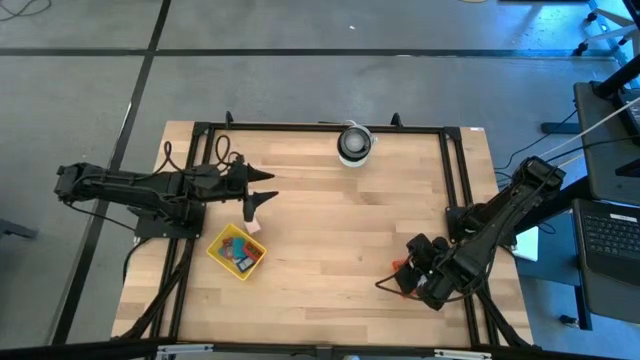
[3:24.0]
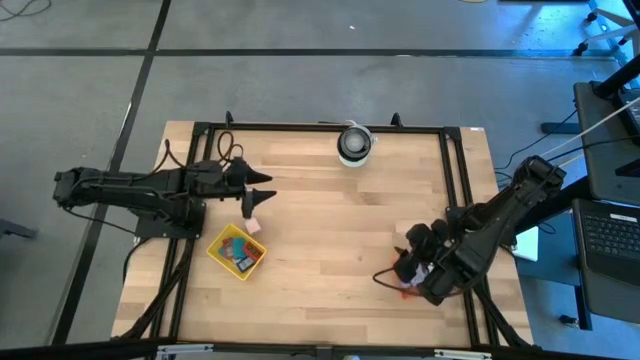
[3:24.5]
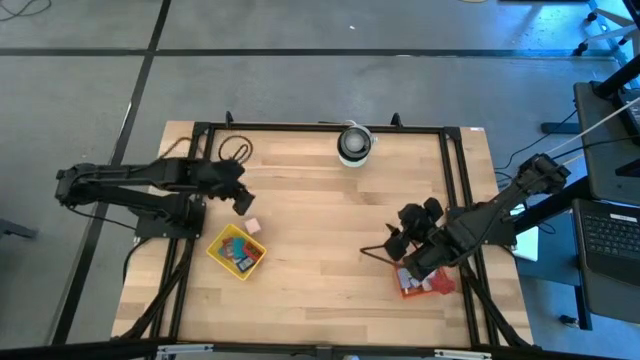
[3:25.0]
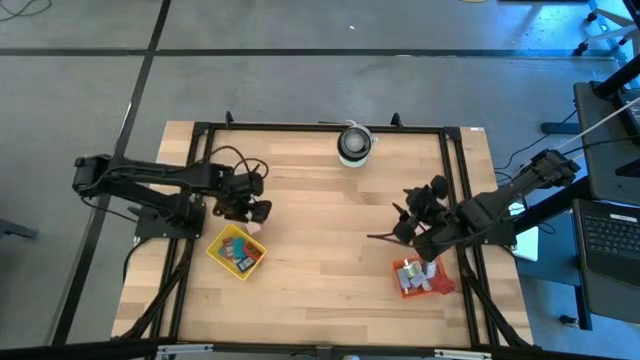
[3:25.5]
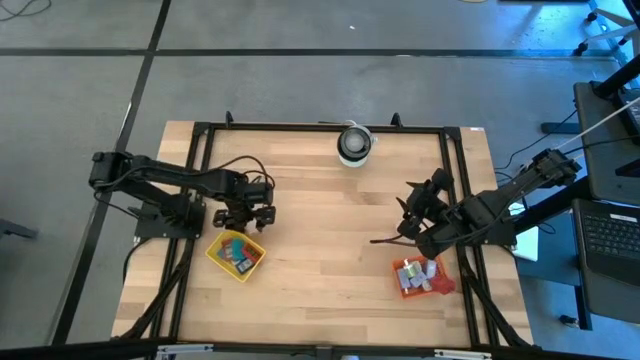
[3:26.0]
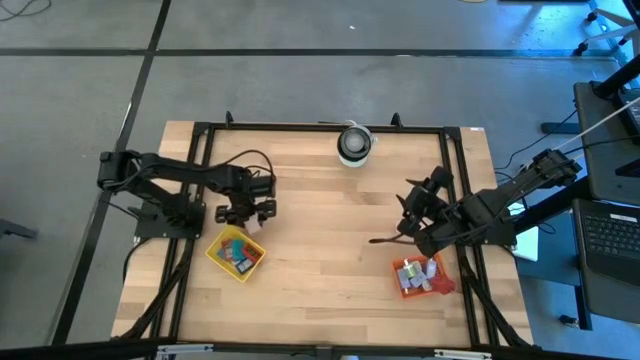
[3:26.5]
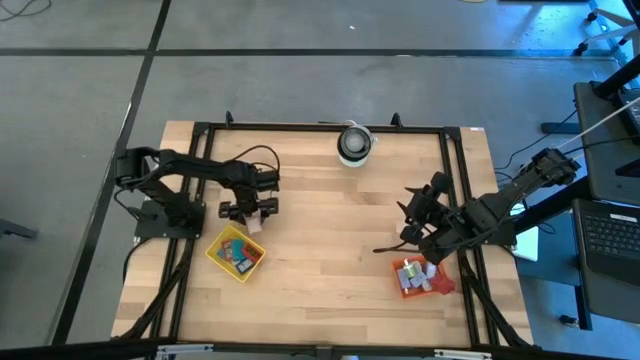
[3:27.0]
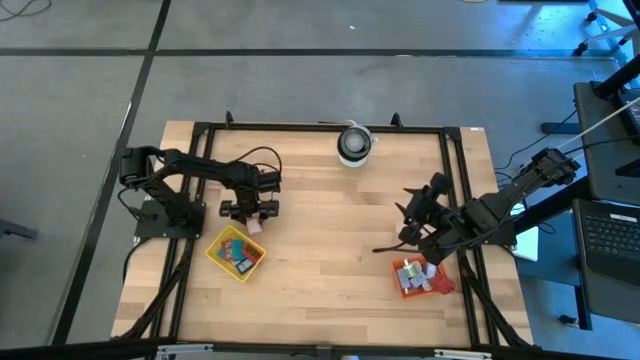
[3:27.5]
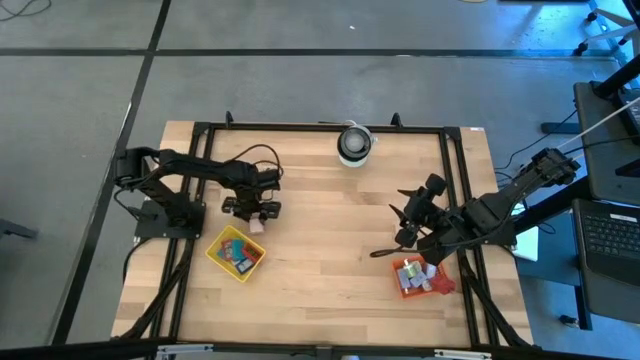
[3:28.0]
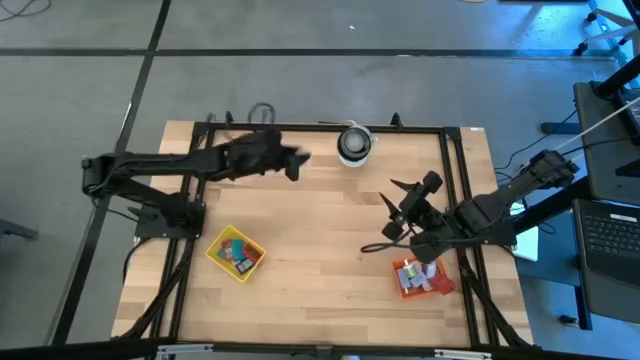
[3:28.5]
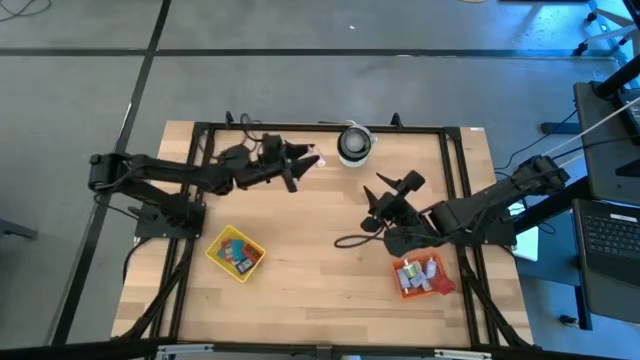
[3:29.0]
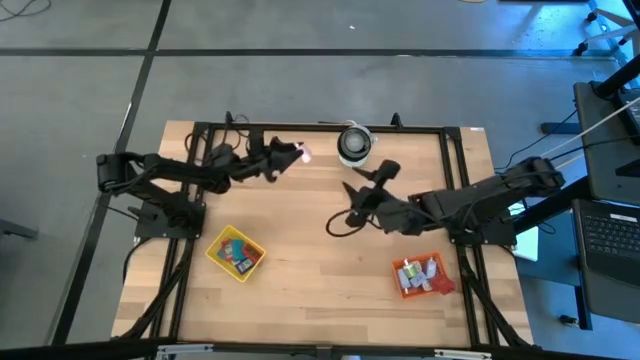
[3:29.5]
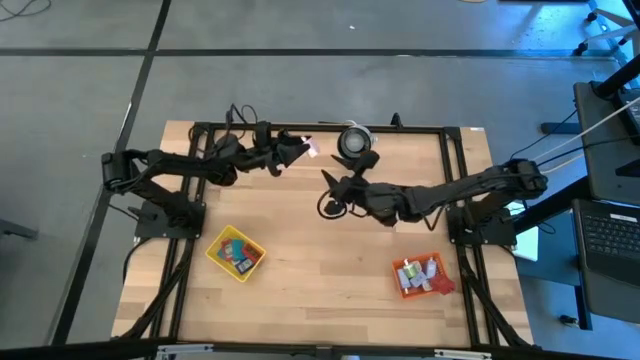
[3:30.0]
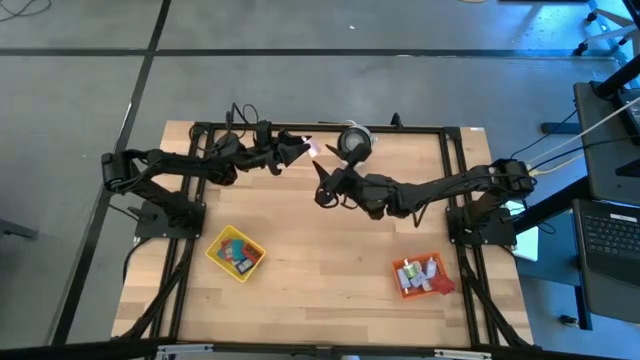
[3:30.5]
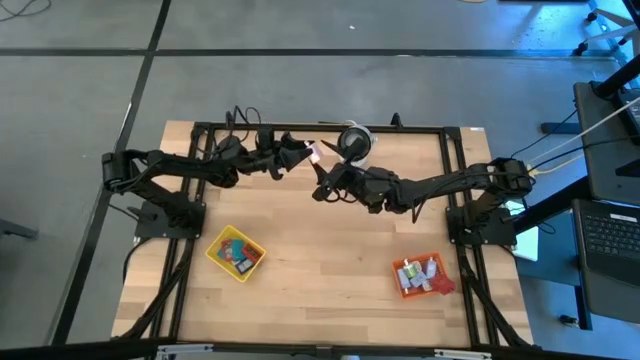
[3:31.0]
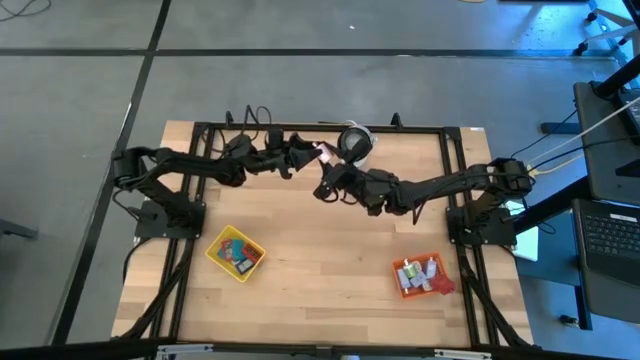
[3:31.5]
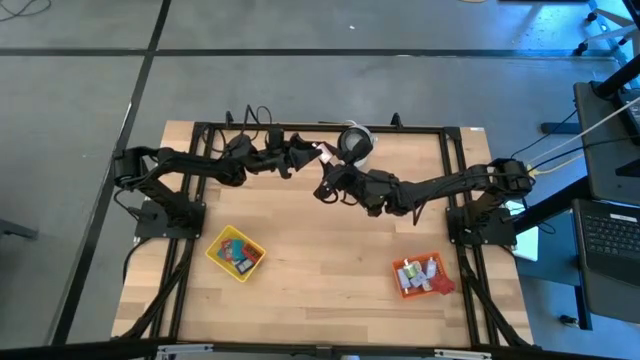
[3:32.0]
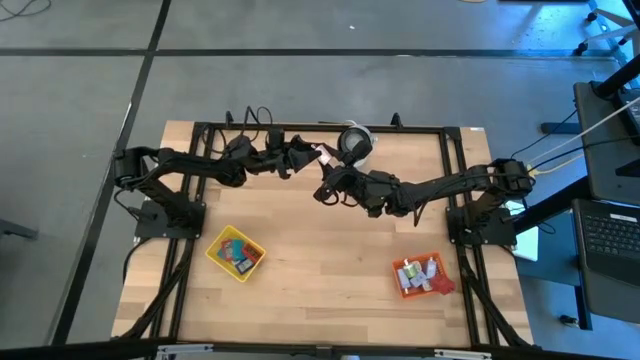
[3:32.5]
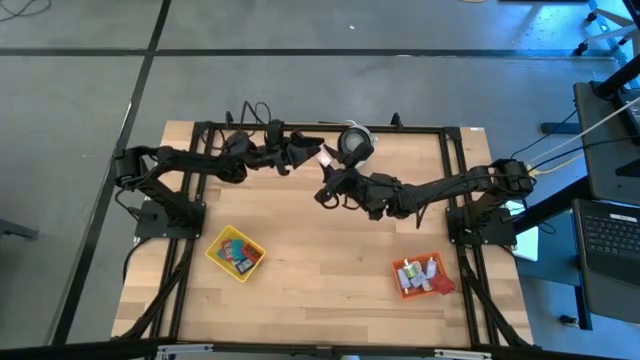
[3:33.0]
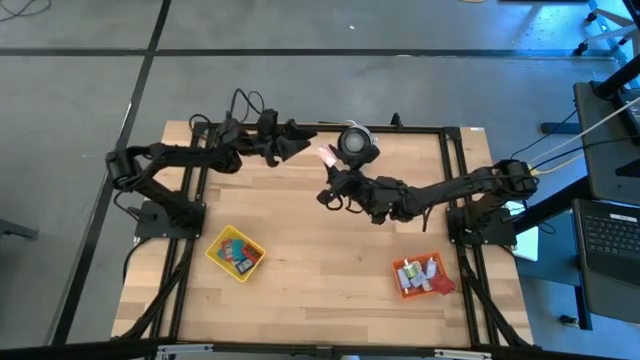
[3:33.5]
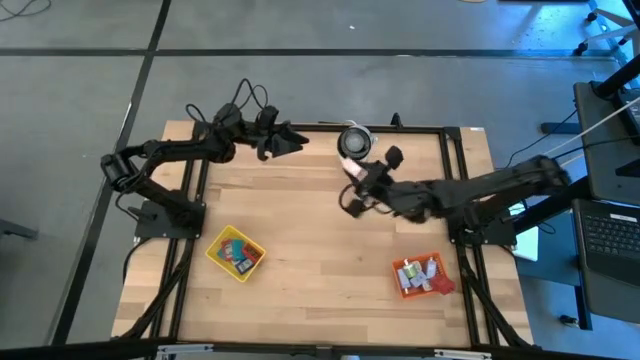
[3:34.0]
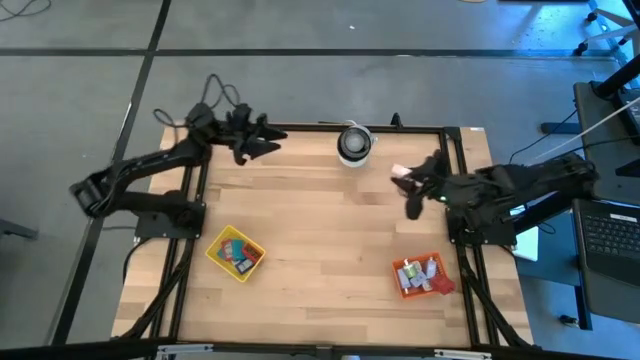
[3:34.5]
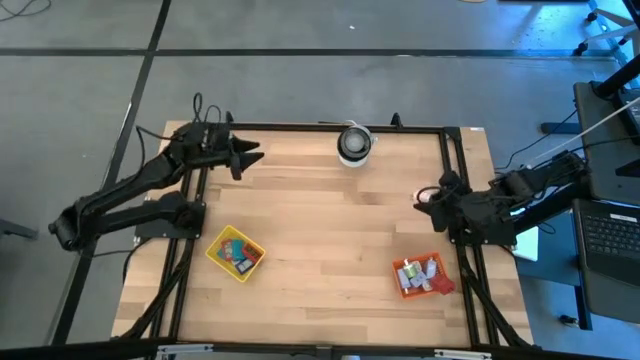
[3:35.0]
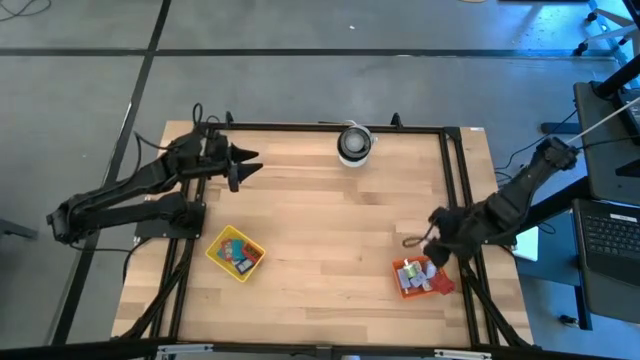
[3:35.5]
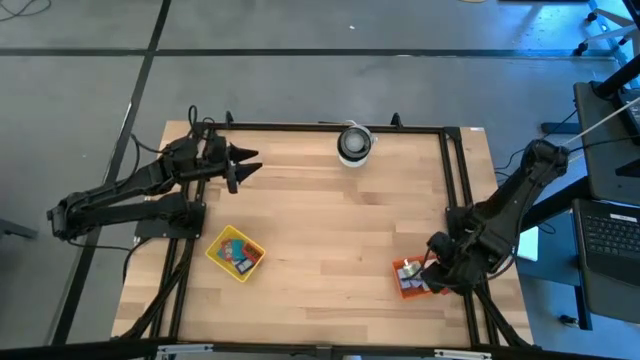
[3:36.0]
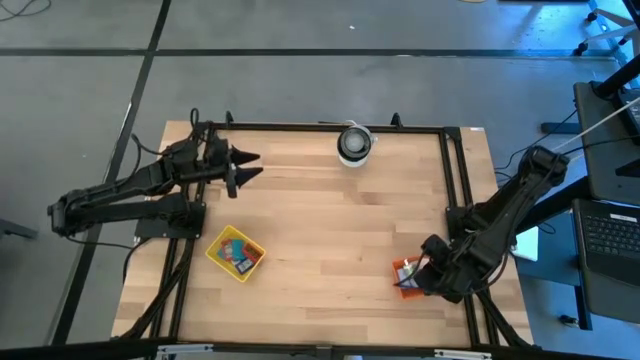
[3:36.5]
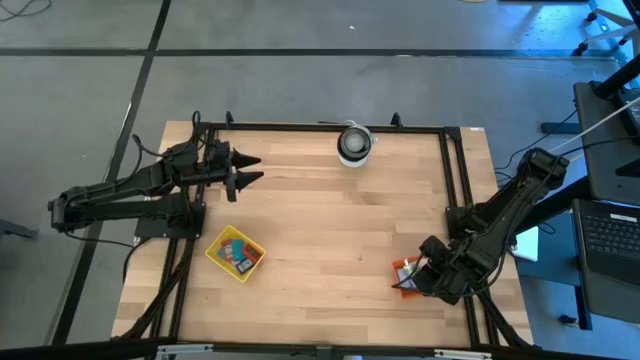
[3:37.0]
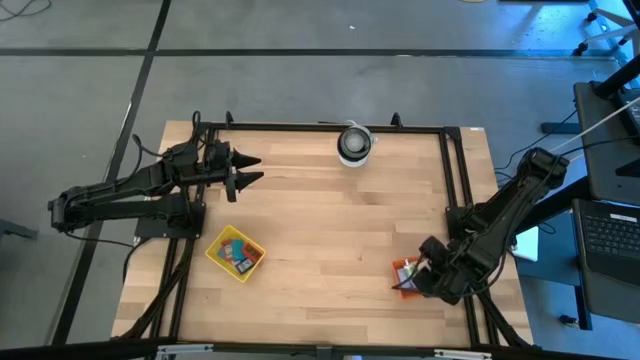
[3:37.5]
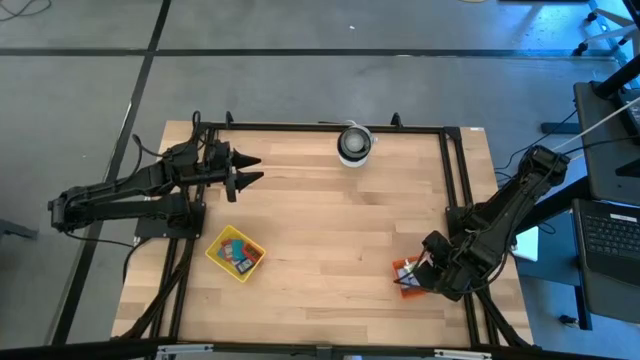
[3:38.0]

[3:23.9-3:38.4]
Task: Pick & Place Office items
Put the light pink charger adapter into the orange bin
